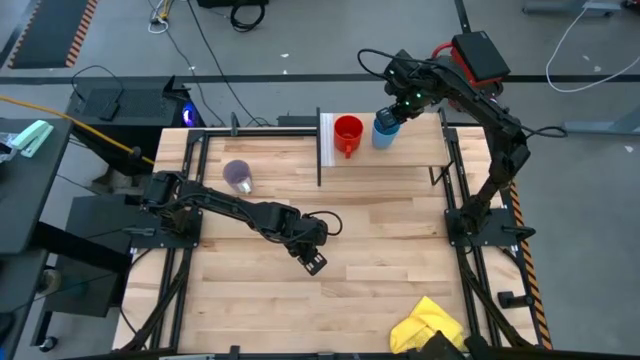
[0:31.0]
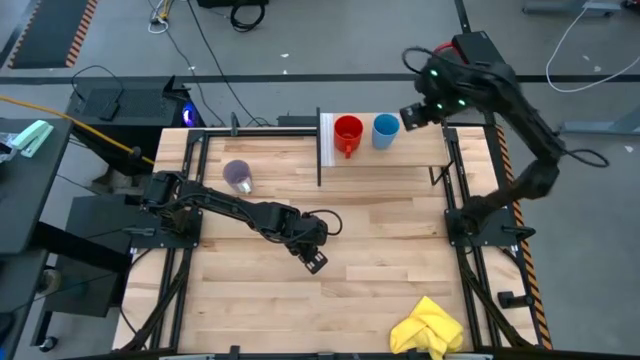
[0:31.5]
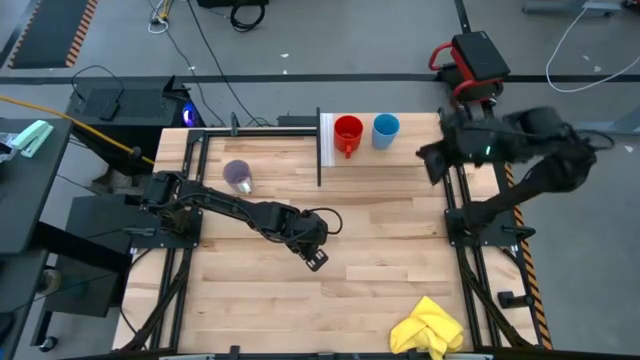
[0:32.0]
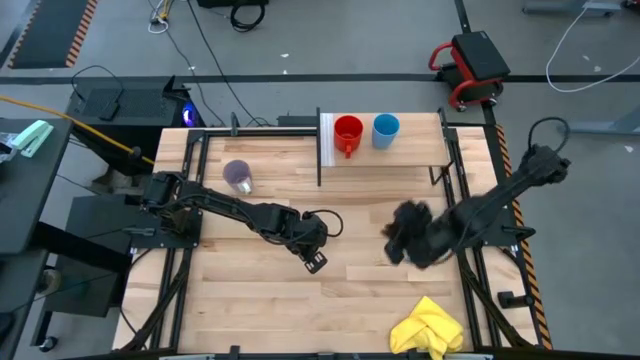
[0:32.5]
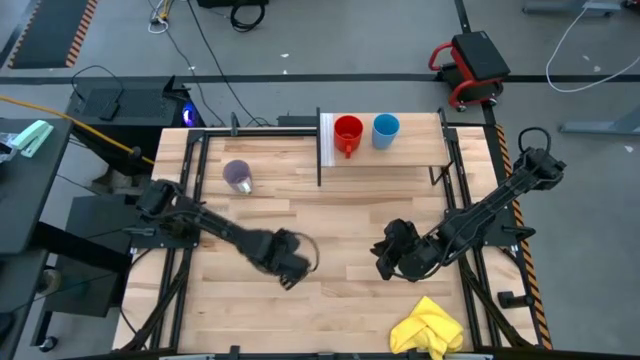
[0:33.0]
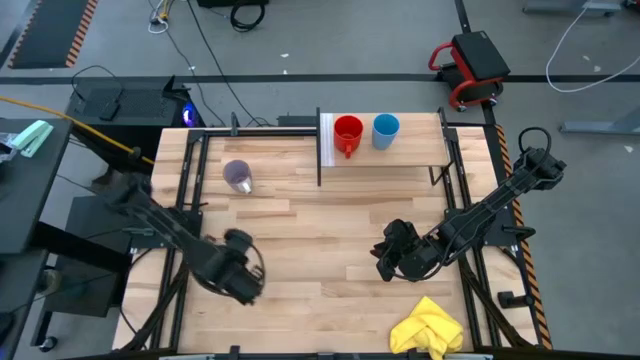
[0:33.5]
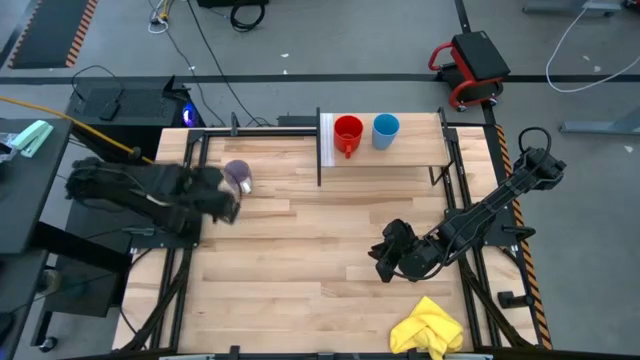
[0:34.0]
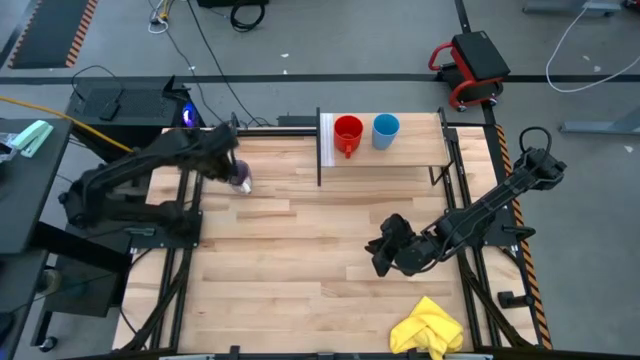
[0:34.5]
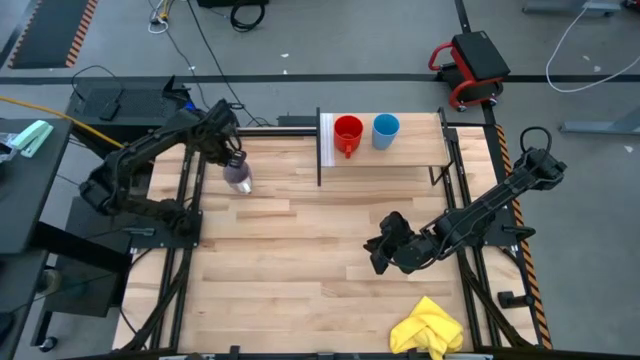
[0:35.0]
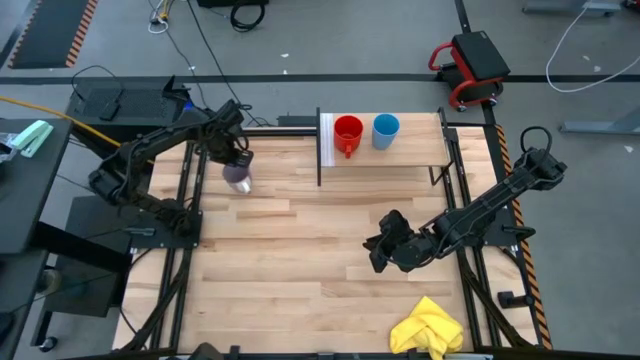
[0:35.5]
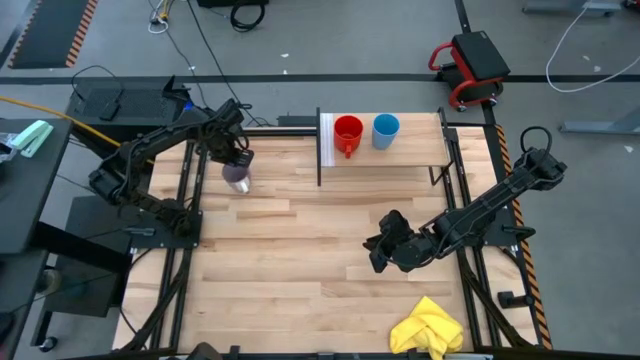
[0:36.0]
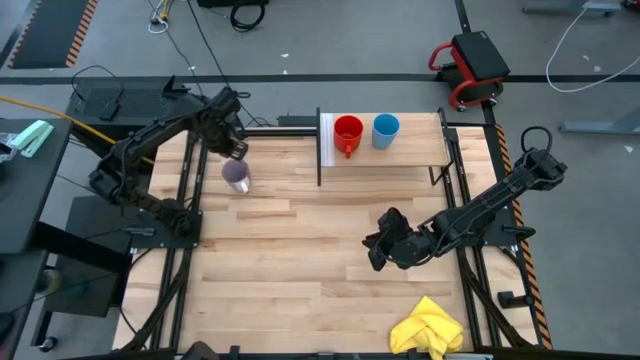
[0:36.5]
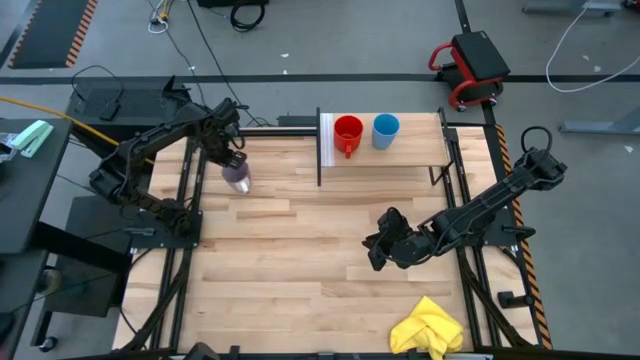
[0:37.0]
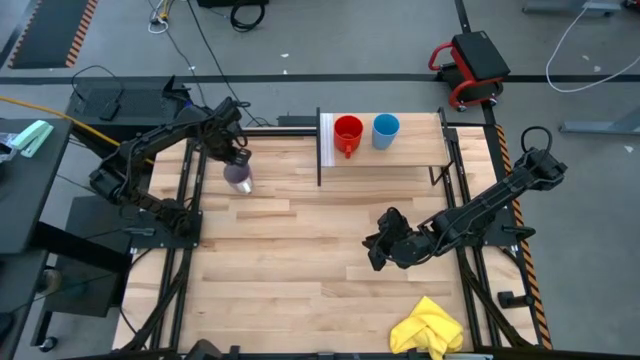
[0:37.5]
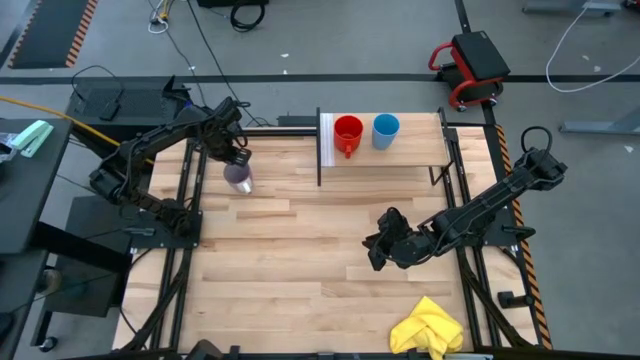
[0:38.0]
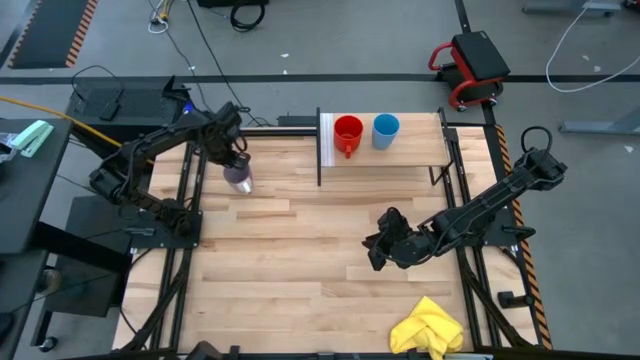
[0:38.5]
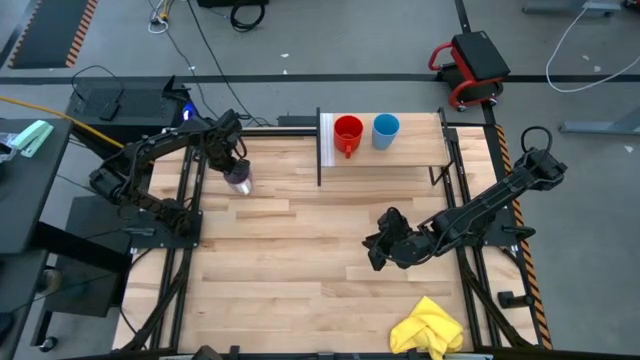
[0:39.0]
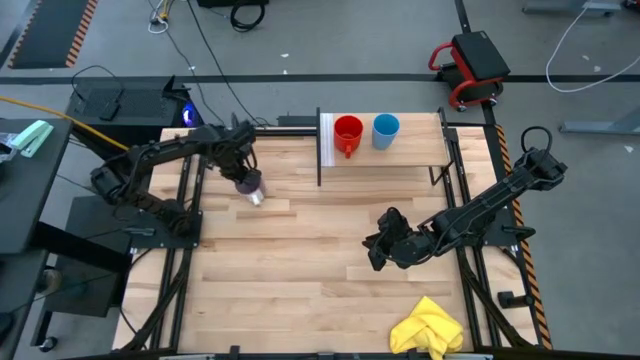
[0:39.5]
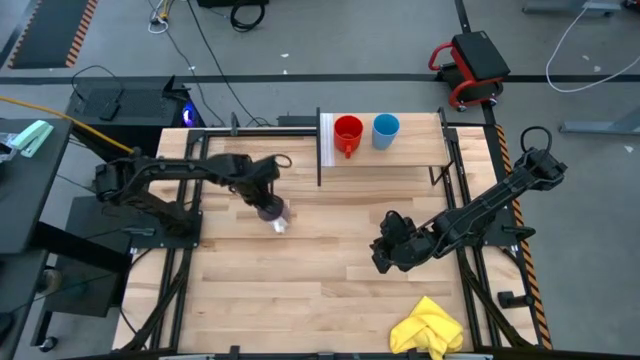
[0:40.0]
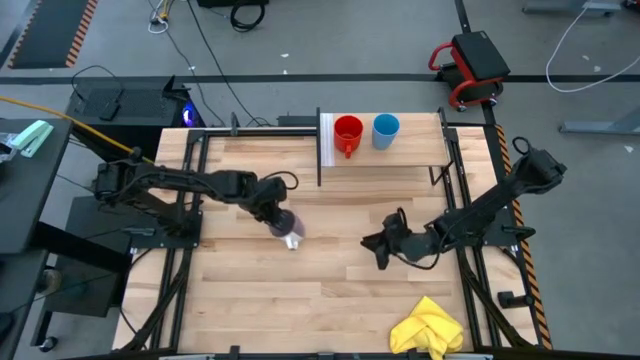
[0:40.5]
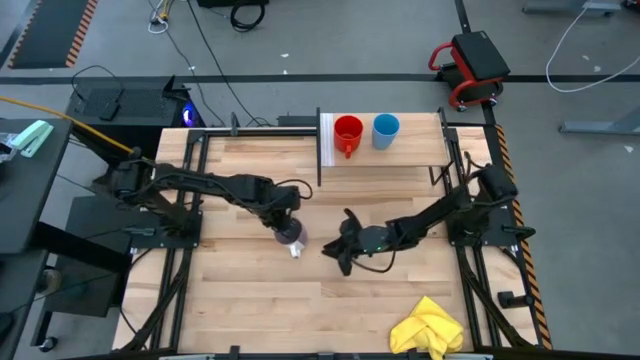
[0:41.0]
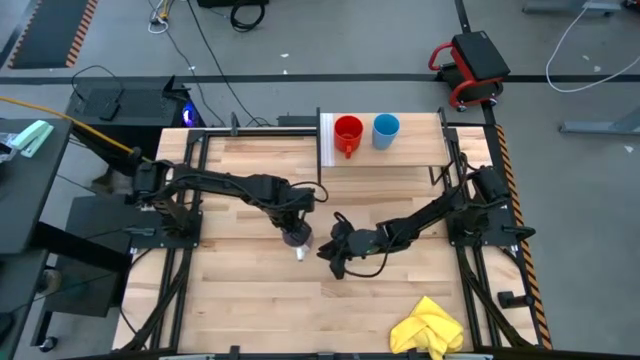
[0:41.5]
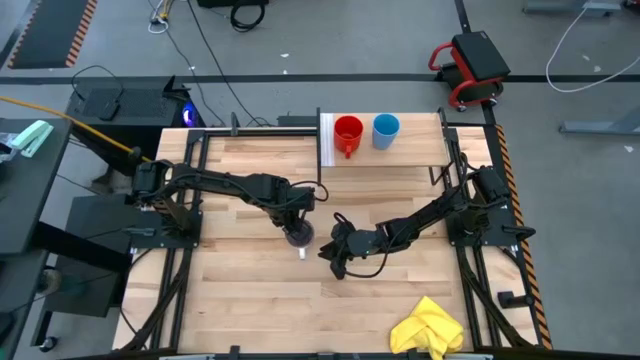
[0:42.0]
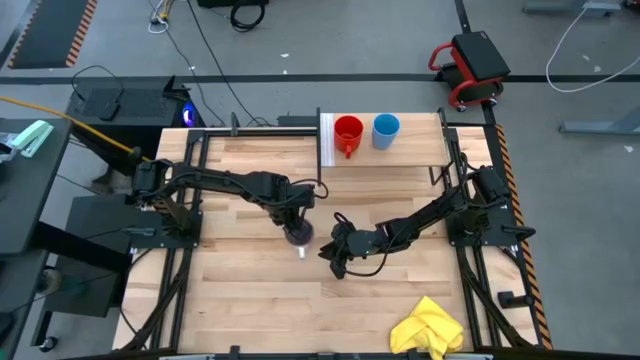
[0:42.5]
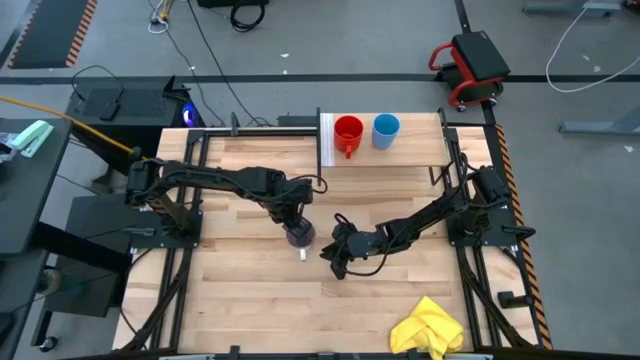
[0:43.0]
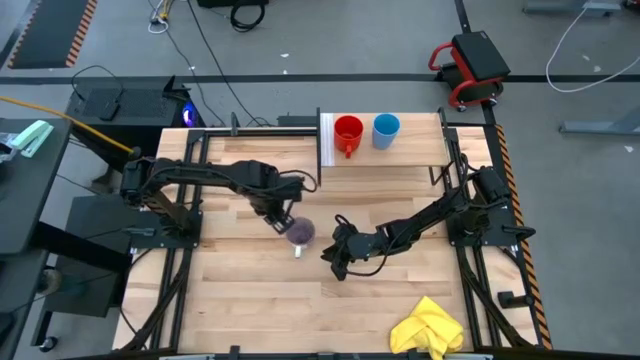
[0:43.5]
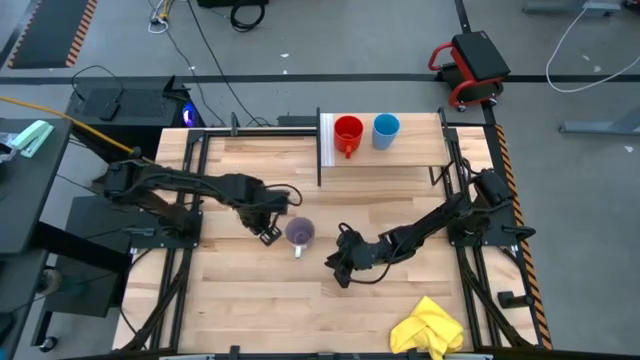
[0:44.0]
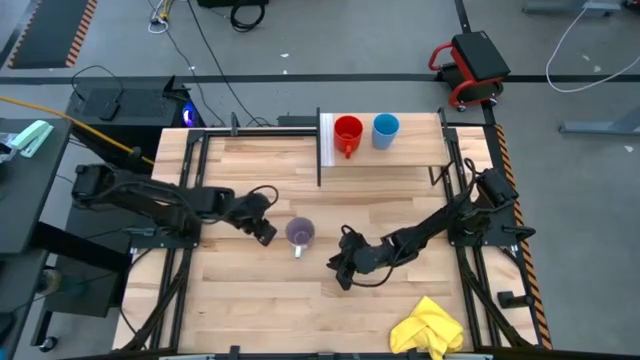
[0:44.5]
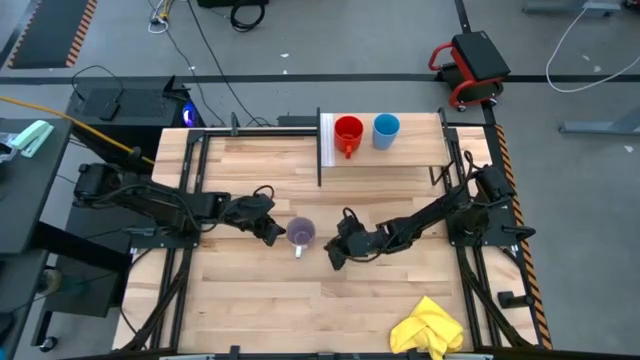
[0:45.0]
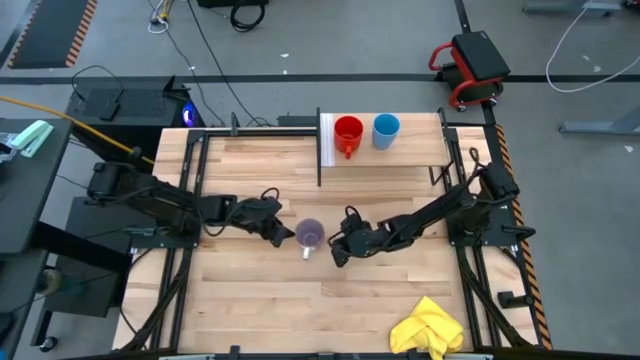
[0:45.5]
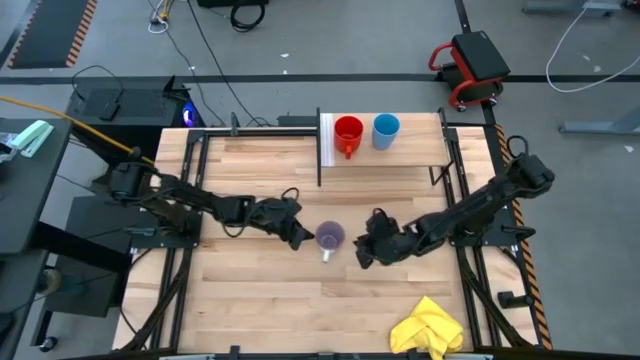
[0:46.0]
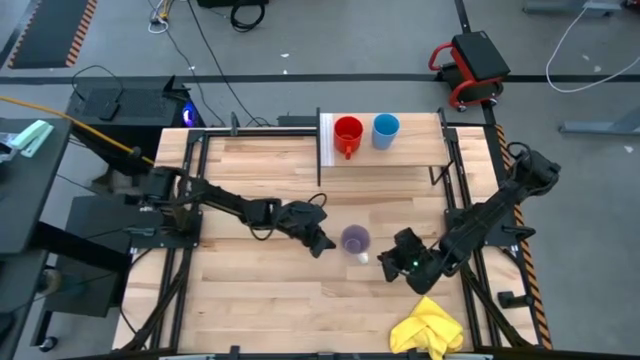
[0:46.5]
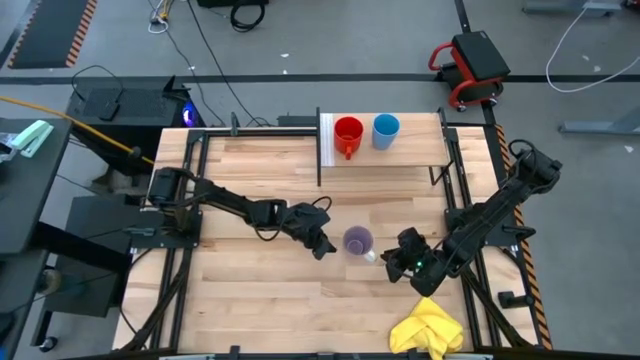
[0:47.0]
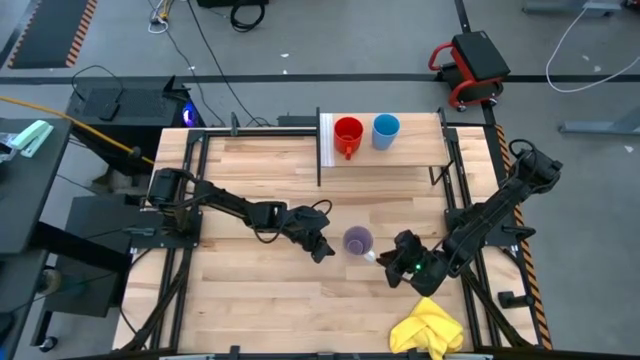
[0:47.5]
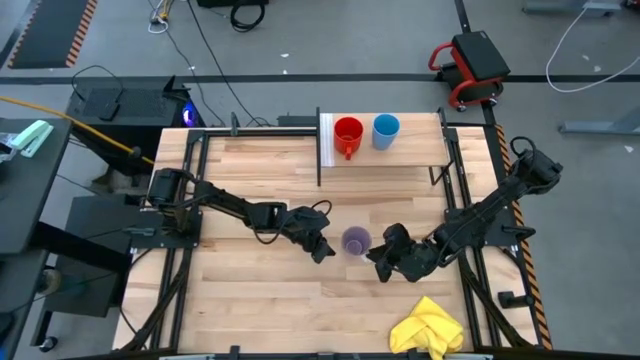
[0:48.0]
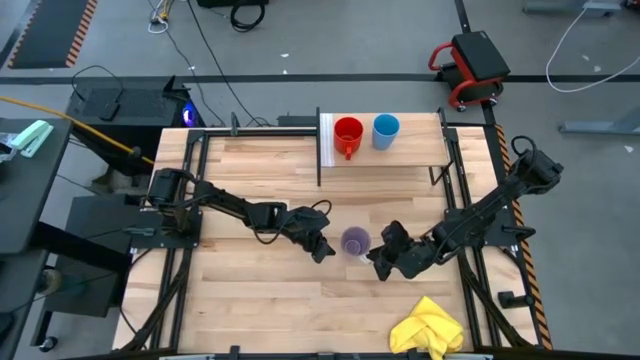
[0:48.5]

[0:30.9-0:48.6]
Task: Stack small to large cups/mugs on shelf
Put the purple mug on the shelf

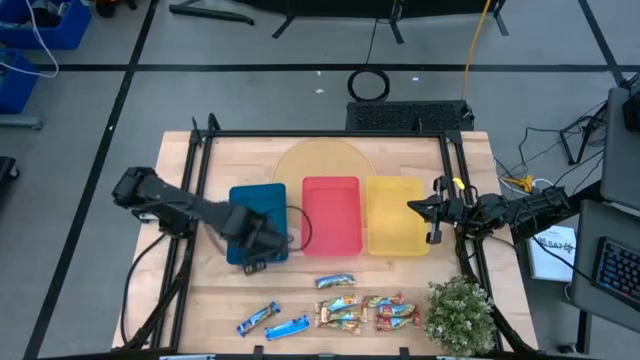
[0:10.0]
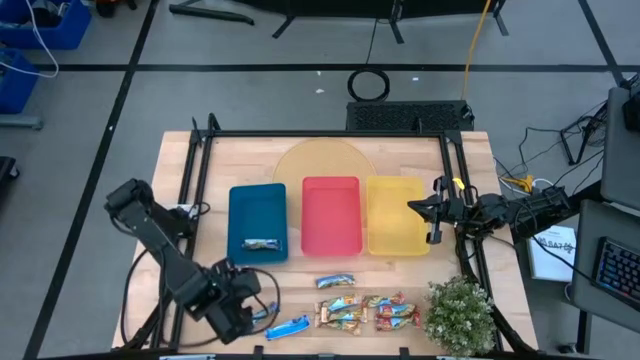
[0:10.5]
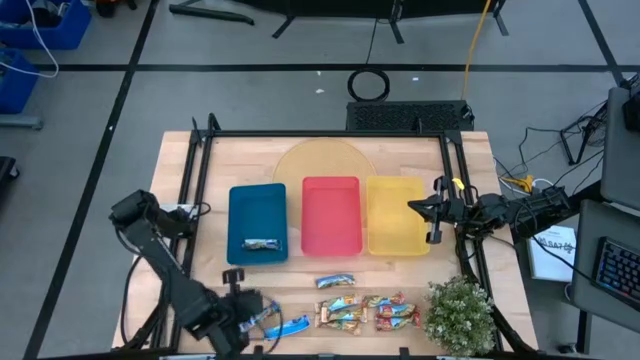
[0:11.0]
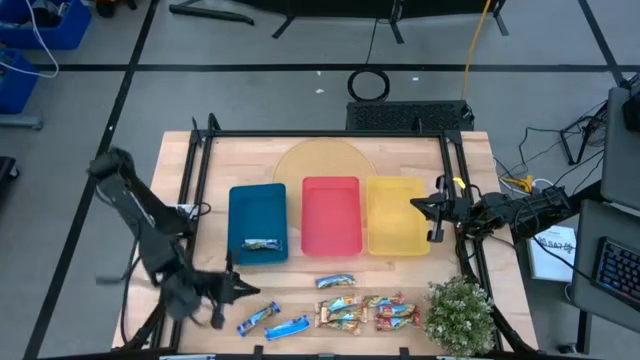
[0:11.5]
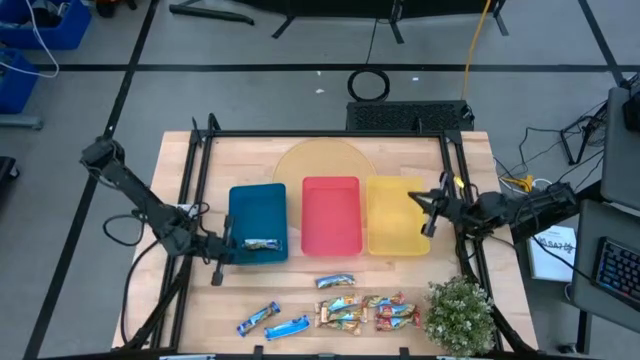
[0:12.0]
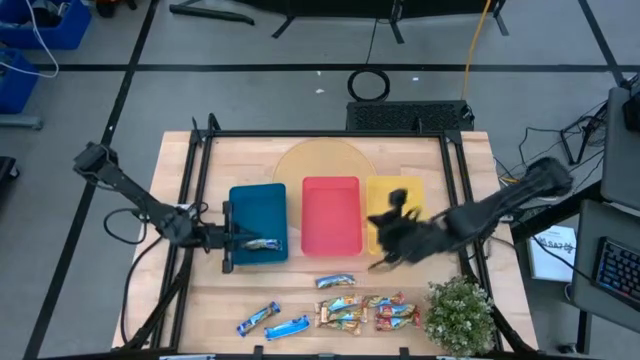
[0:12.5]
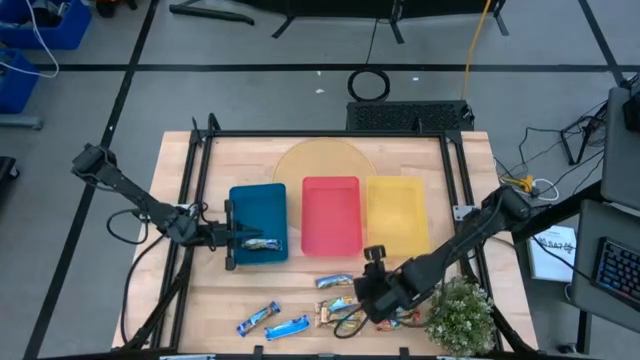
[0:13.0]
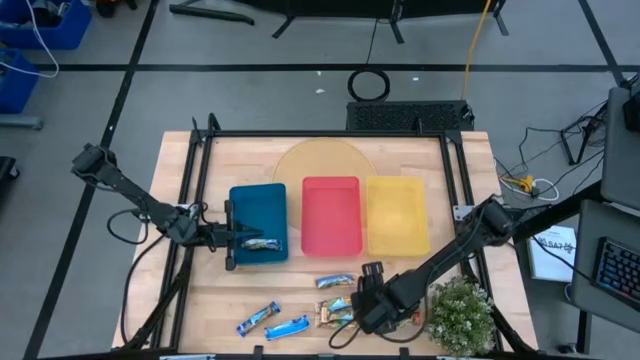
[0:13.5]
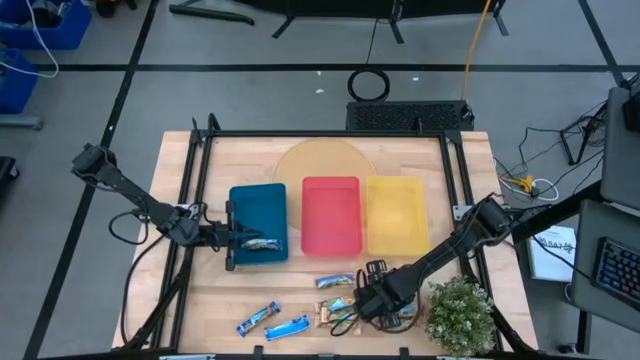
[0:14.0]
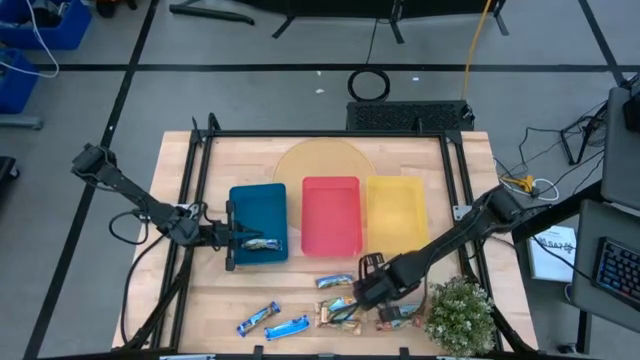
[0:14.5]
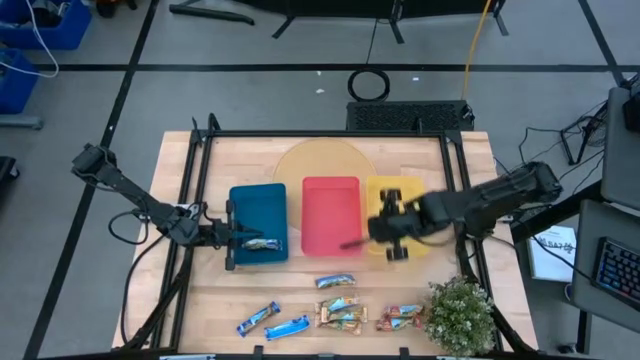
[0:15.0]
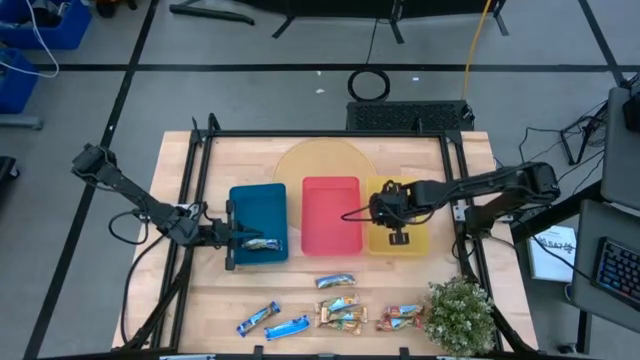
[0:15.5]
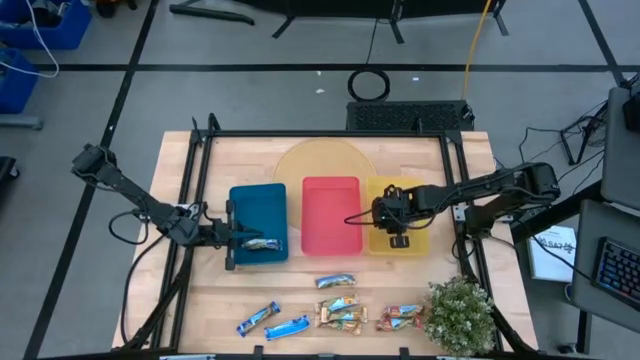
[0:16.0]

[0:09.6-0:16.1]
Task: Pick and place Granola Bars by type
Put the top red granola bar into the yellow bin
